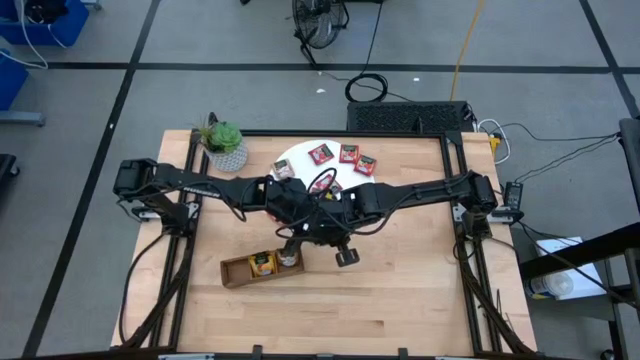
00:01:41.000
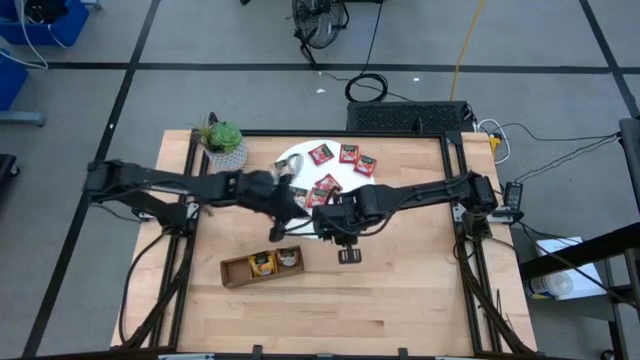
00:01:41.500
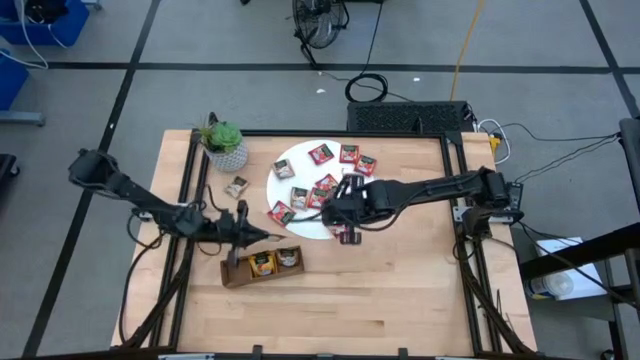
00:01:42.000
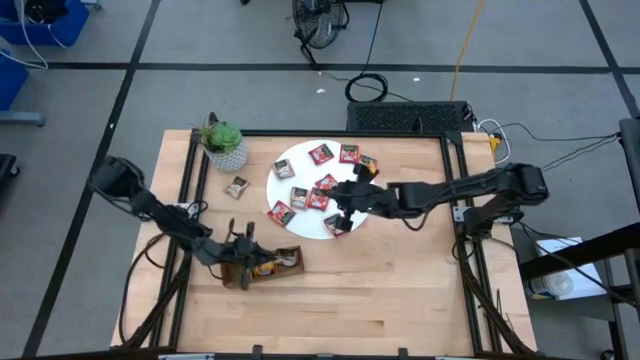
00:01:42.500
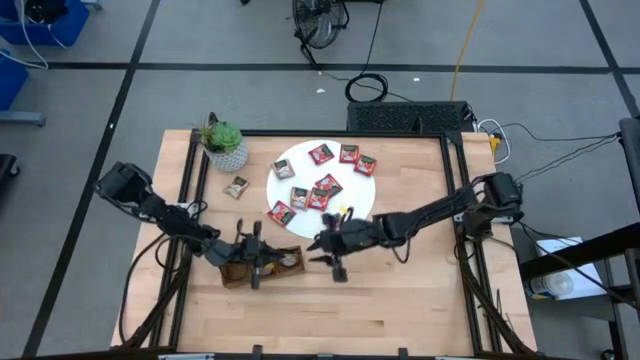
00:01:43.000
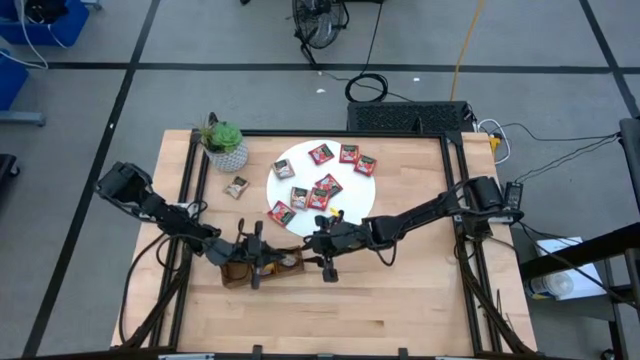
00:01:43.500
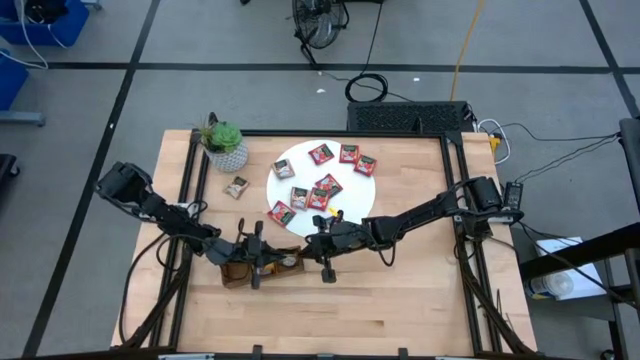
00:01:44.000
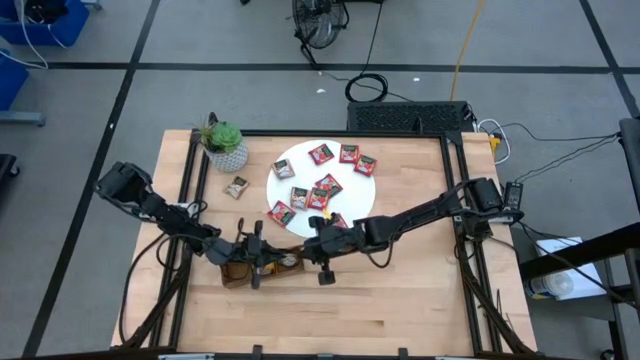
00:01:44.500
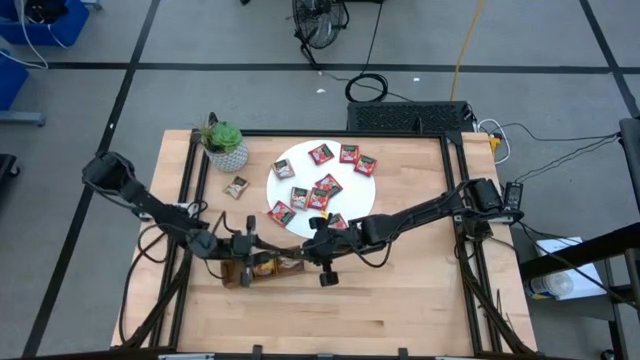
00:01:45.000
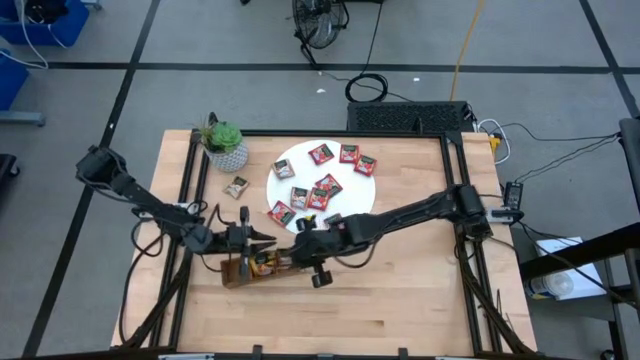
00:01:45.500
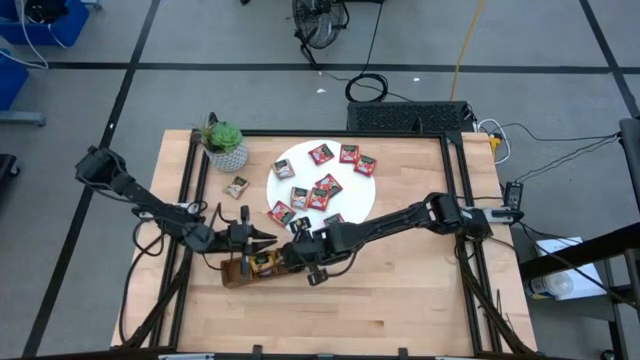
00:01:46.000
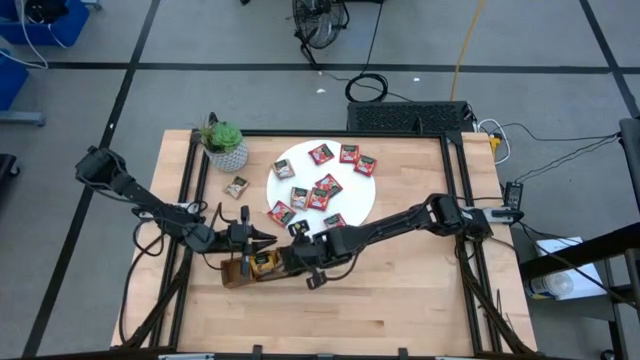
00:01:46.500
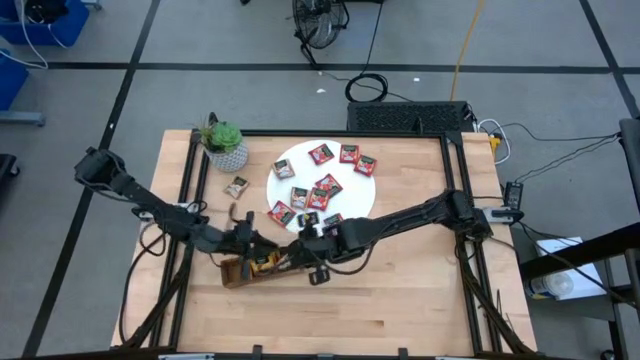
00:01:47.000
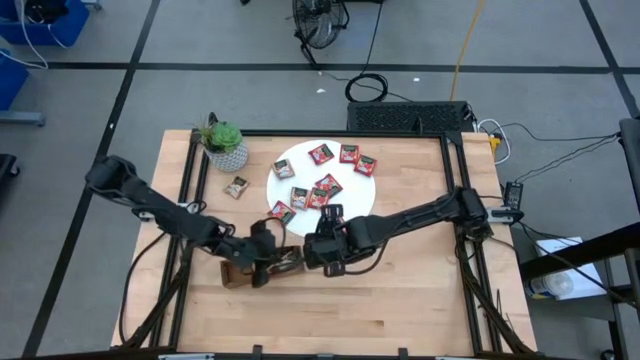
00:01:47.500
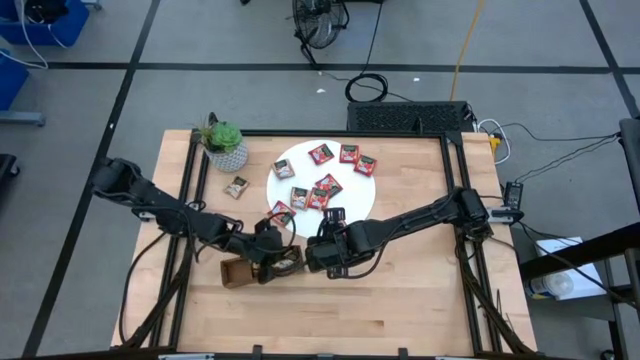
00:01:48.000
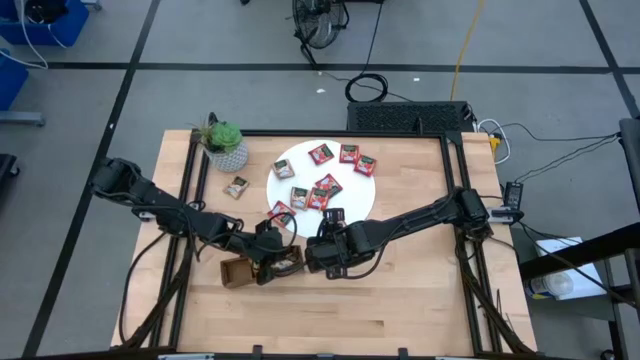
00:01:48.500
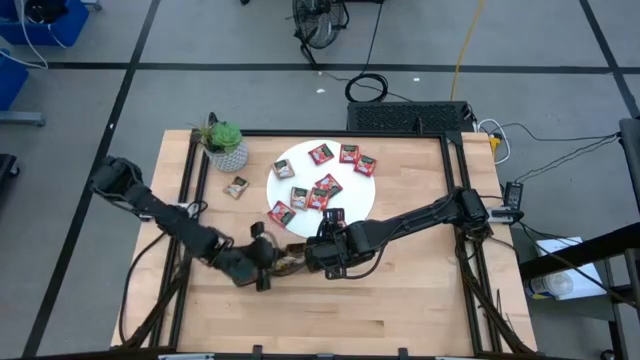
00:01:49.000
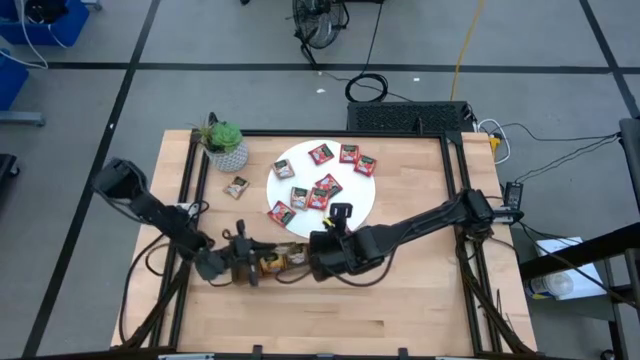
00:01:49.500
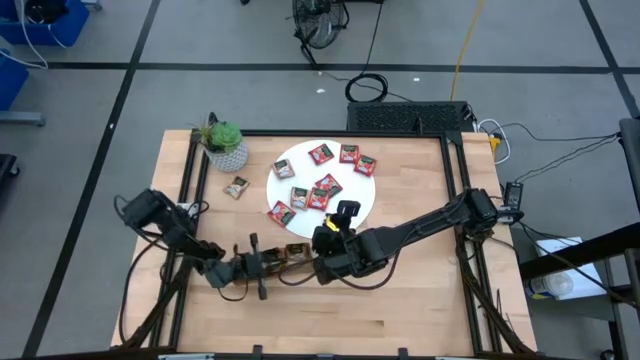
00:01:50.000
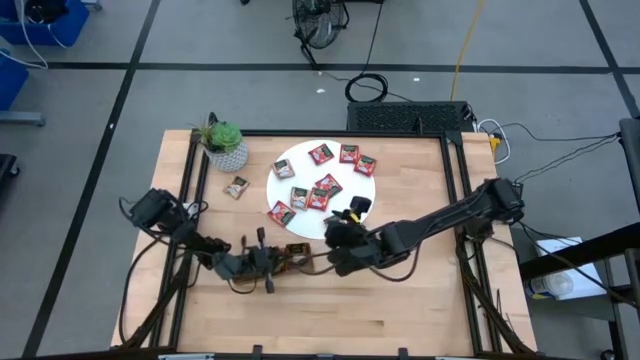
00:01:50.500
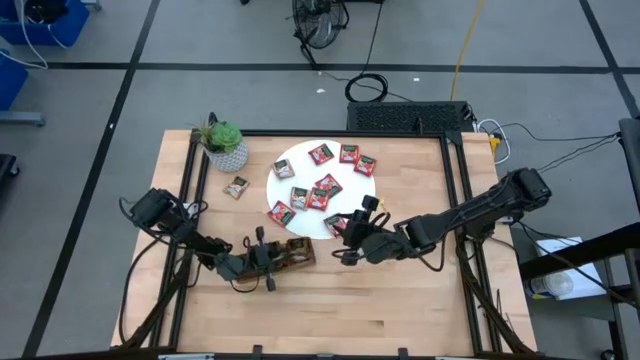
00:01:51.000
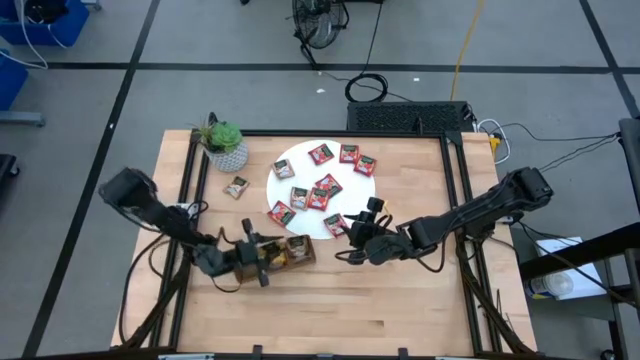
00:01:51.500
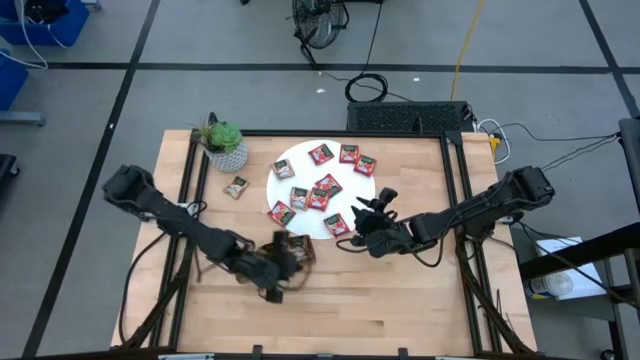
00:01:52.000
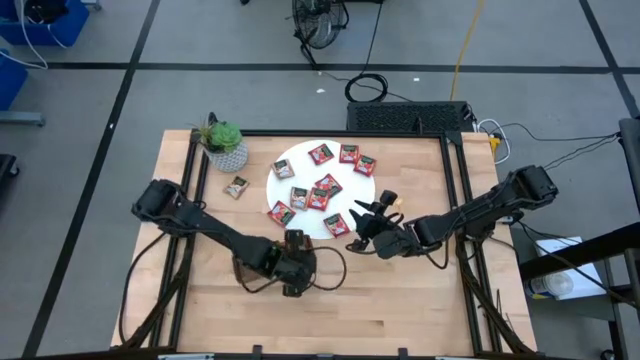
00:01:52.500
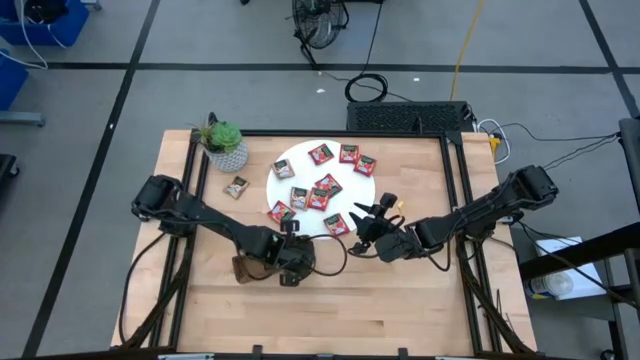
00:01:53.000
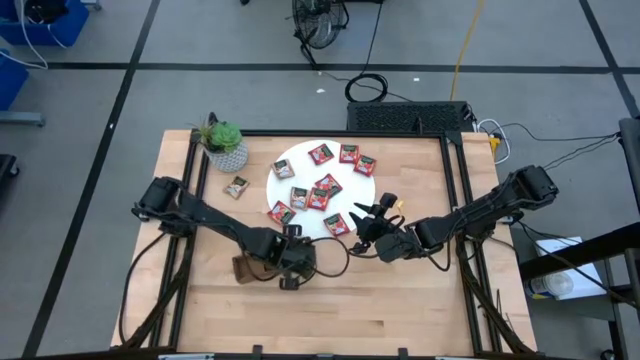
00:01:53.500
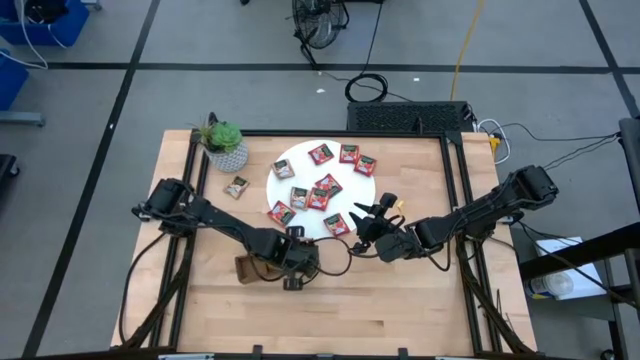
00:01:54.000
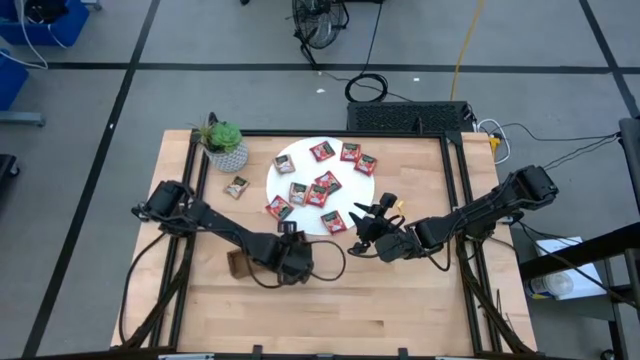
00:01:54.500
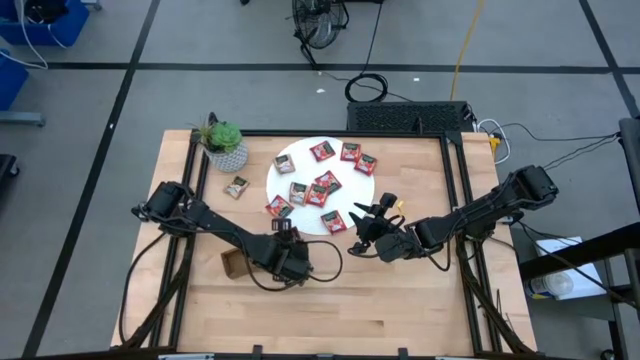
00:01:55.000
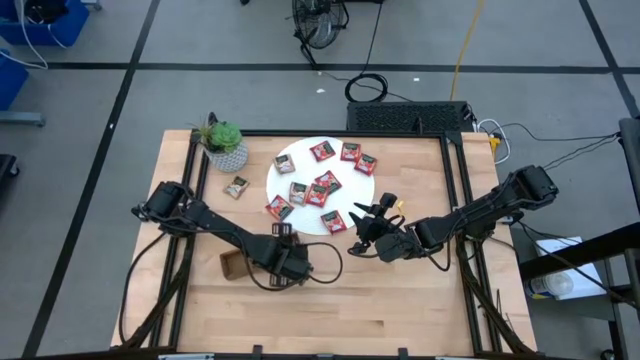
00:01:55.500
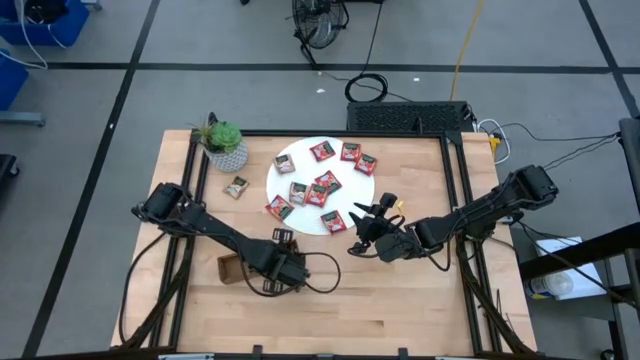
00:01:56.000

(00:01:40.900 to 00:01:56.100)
Task: Pick & Place Tea
Put the brown tea bag into the right section of the wooden organizer

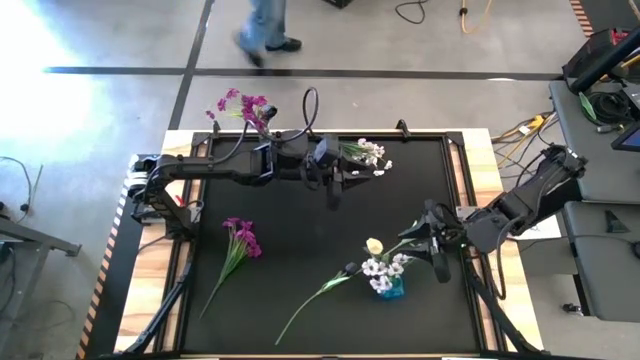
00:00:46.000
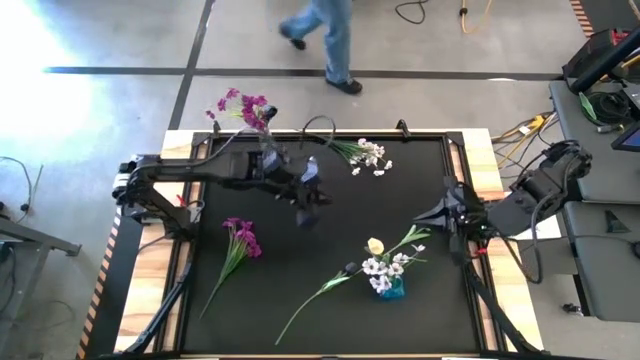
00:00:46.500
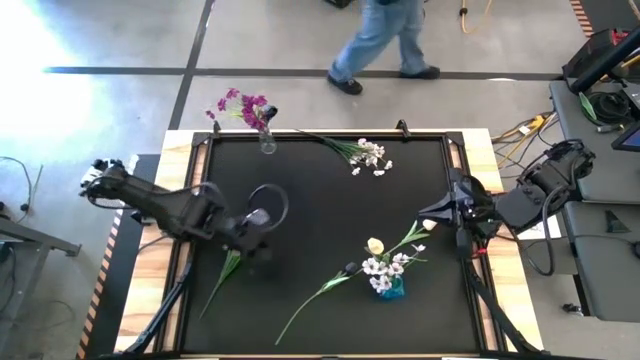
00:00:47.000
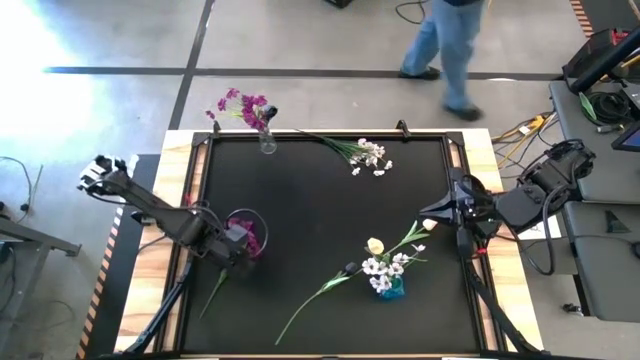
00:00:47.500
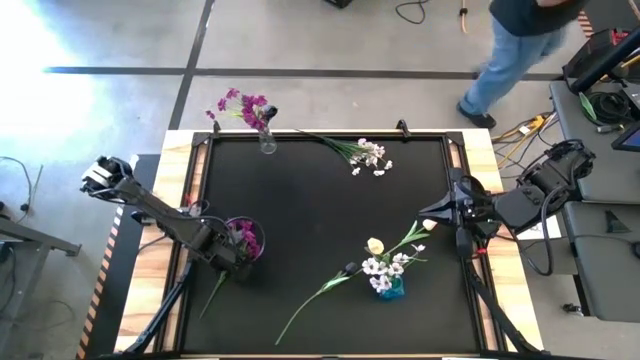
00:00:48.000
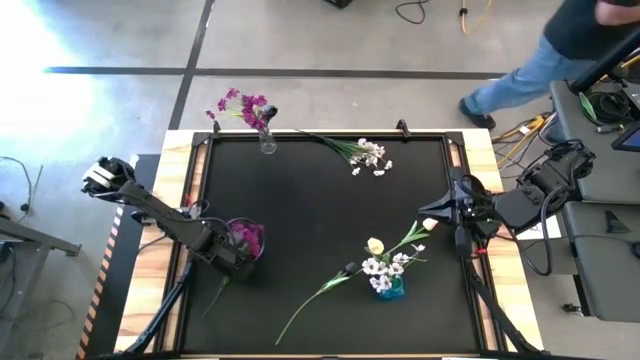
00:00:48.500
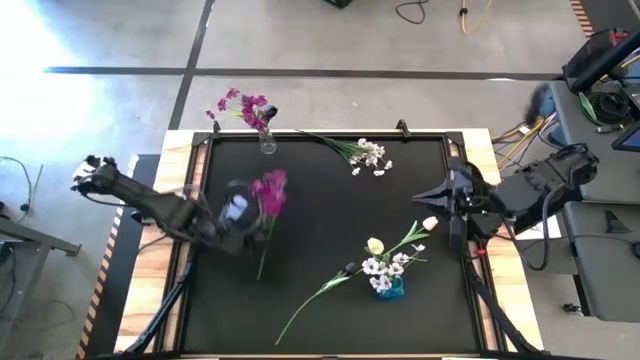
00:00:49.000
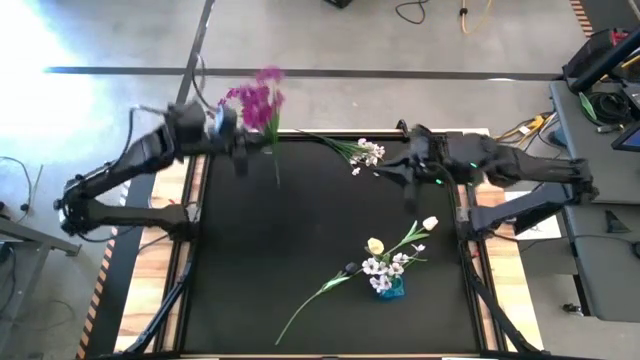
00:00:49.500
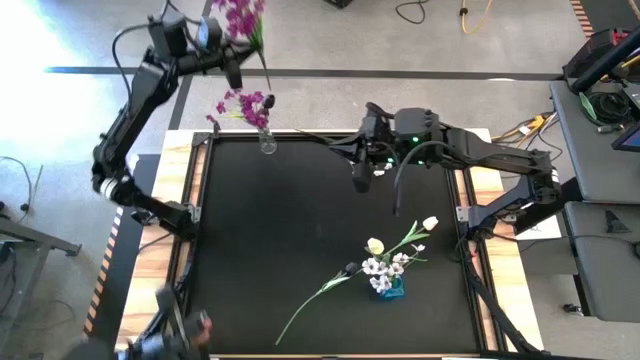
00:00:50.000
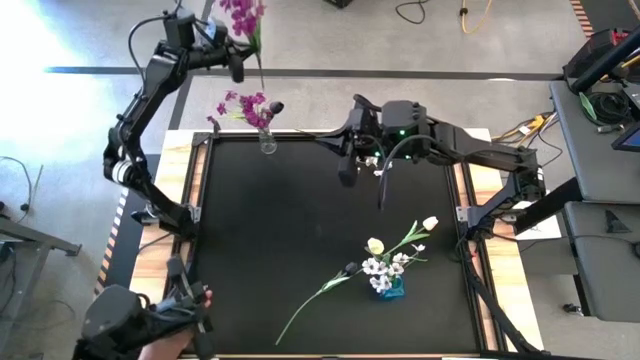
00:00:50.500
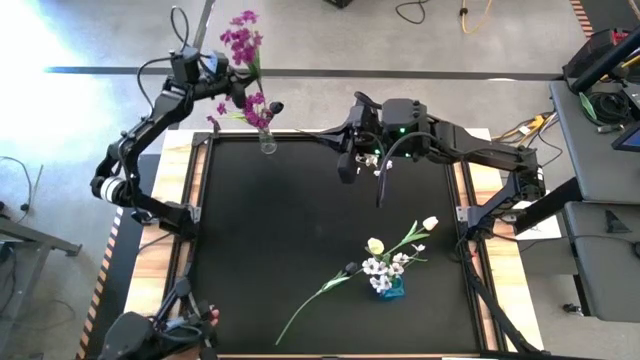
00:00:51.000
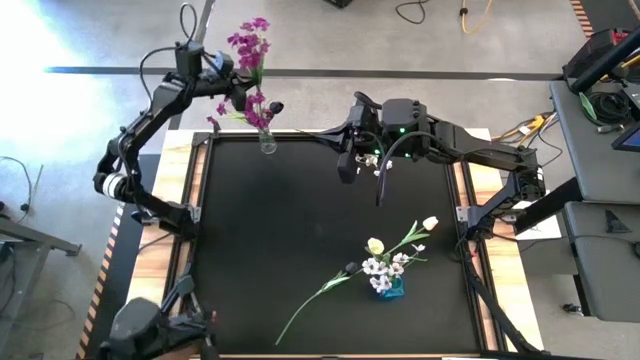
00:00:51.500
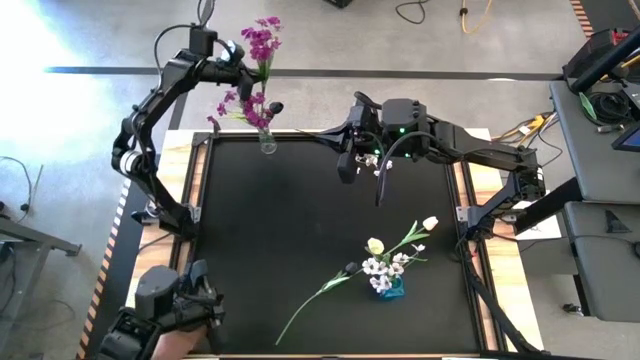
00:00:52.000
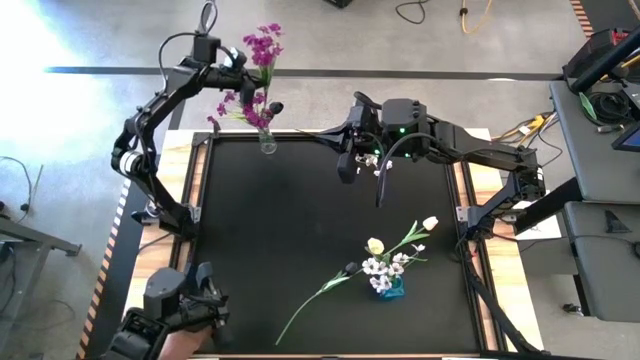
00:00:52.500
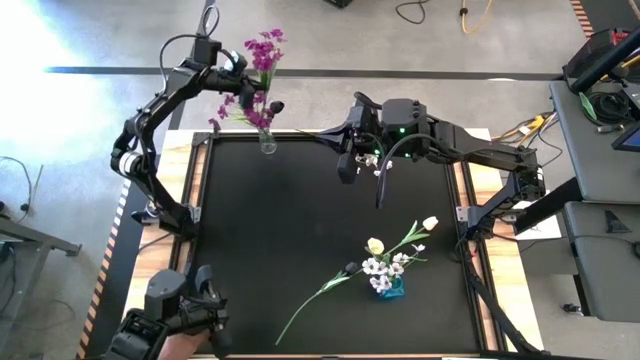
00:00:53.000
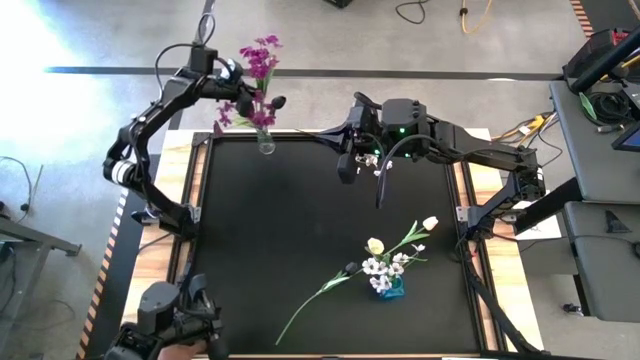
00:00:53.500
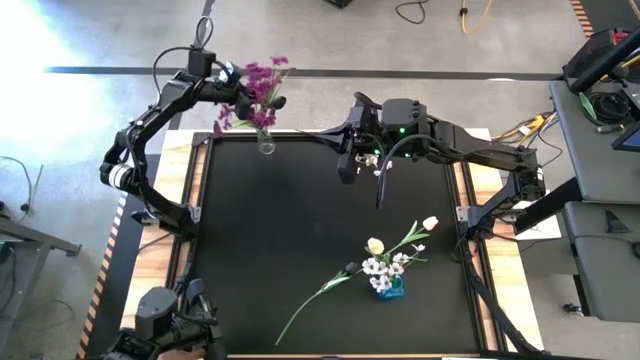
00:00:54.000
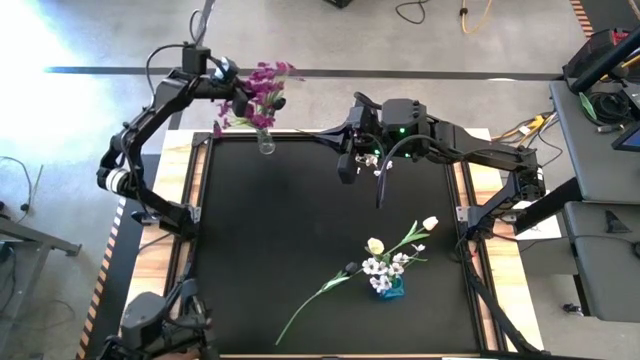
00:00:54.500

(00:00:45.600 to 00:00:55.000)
Task: Sort flowers into vase by color
Put the violet flowers into the transparent vase
